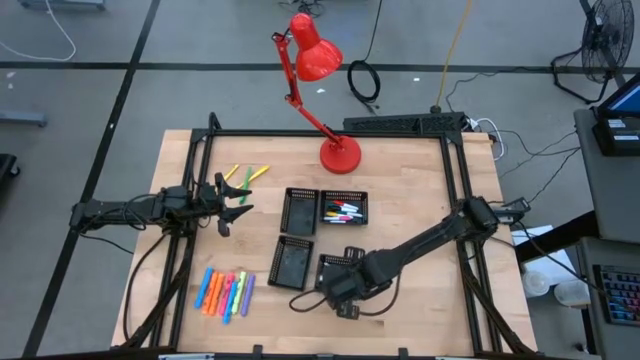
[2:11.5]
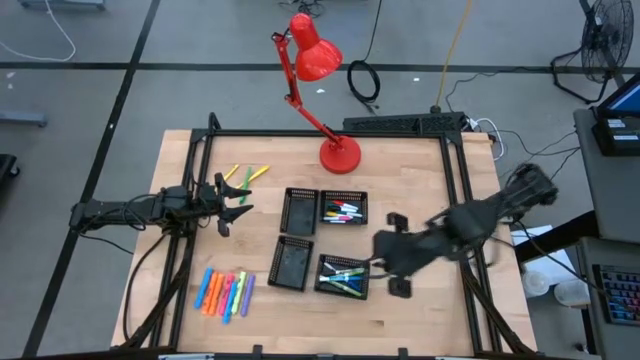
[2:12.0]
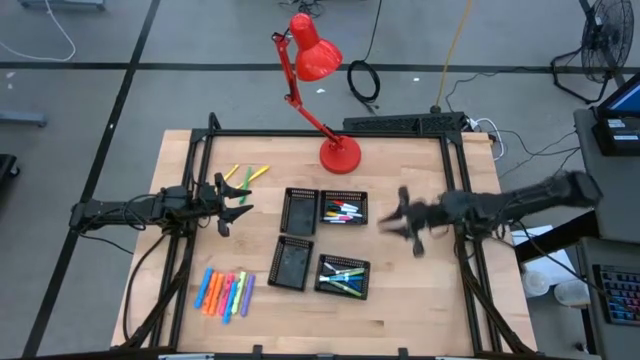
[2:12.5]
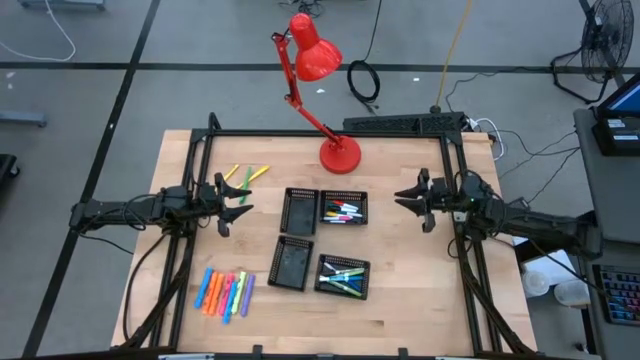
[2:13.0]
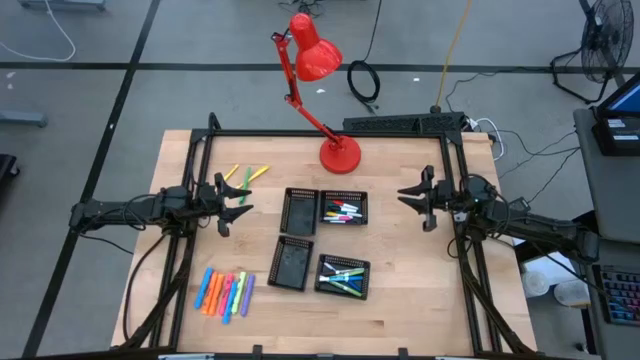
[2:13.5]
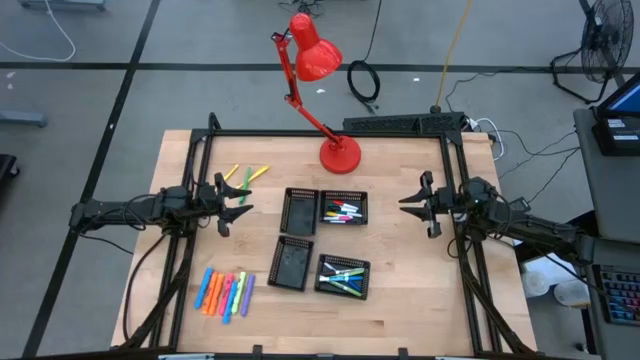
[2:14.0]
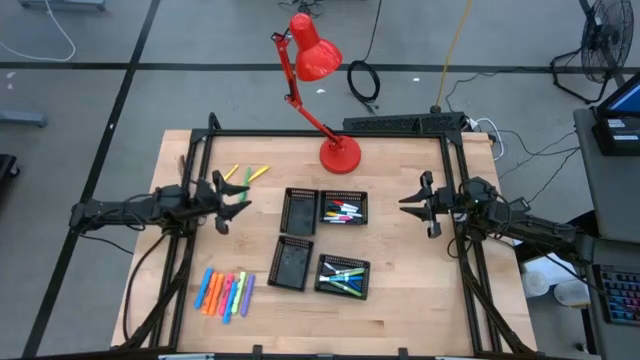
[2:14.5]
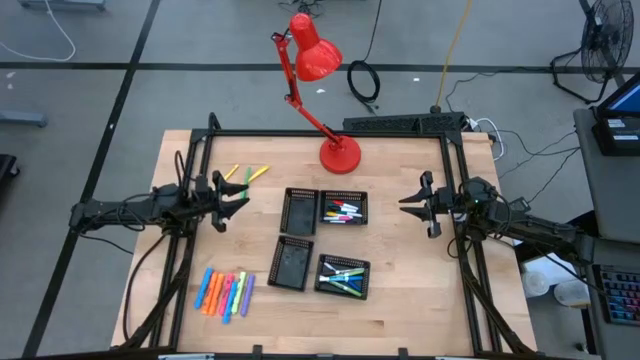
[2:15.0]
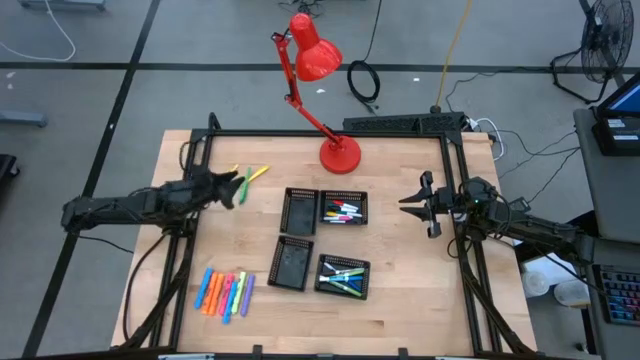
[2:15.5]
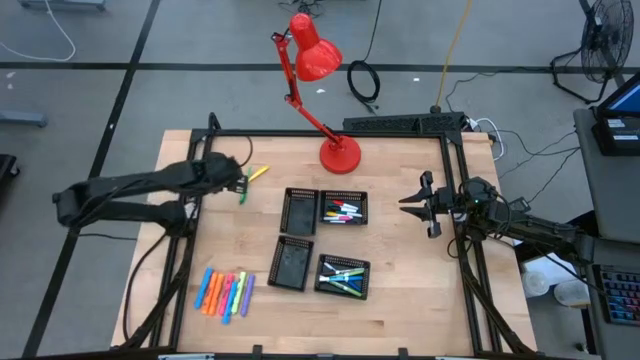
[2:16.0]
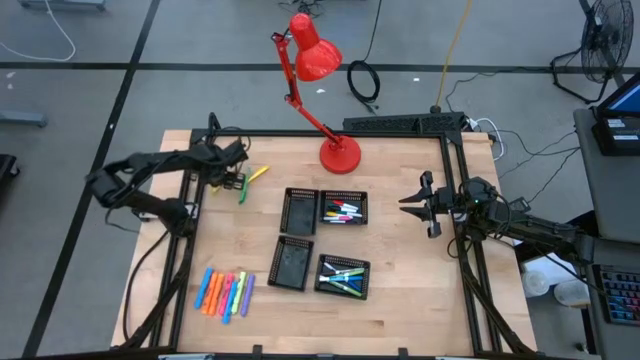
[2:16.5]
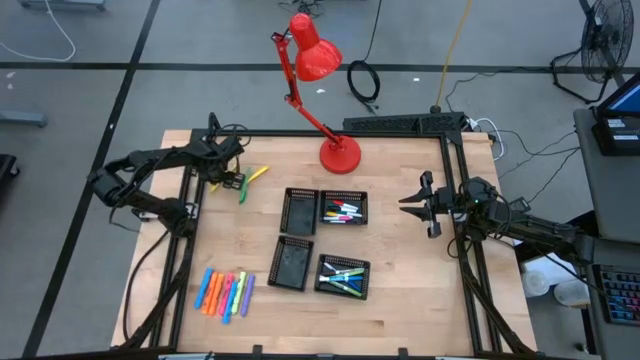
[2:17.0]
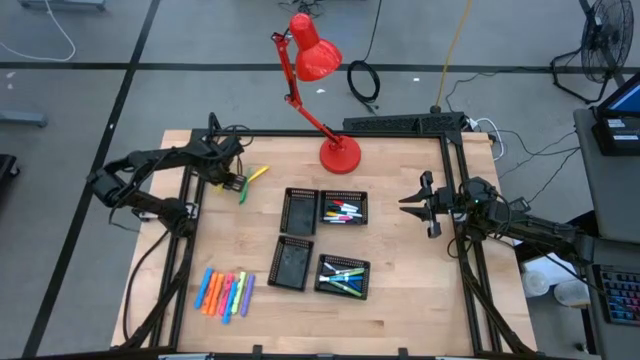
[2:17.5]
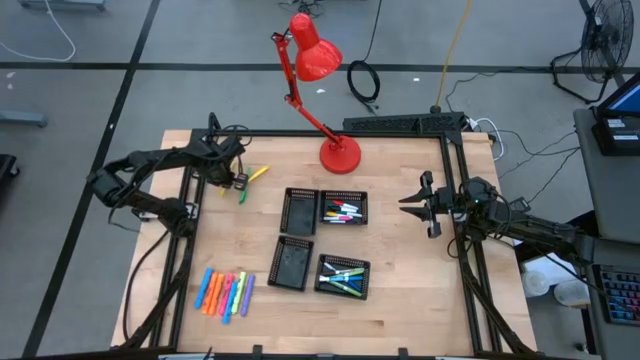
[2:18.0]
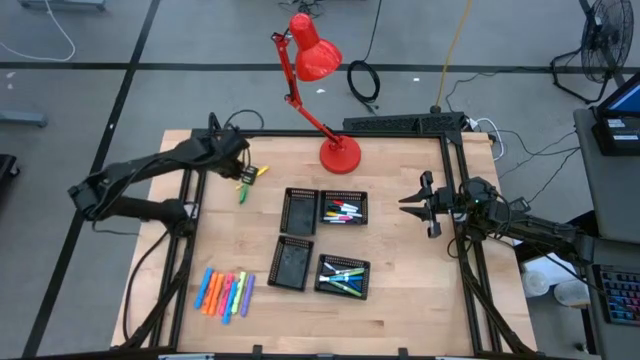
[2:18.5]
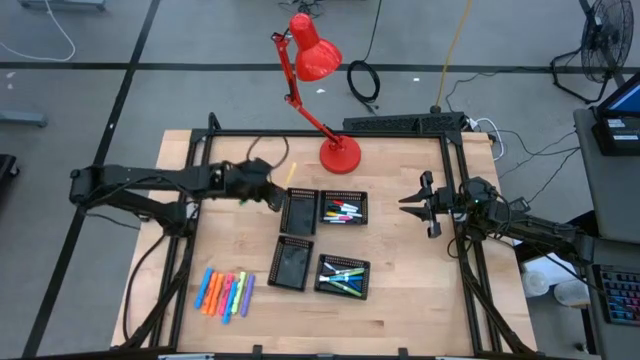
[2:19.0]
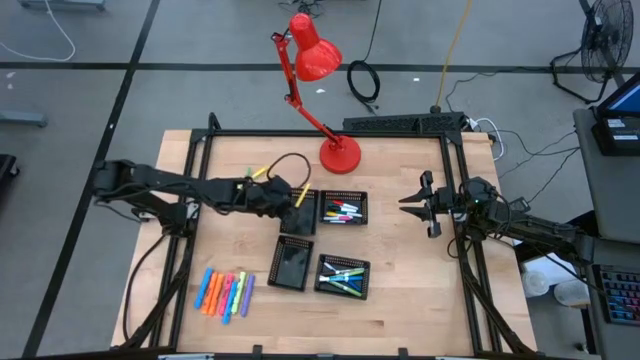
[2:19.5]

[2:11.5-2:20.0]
Task: Pick & Place Markers
Put the yellow pen into the top left black bin

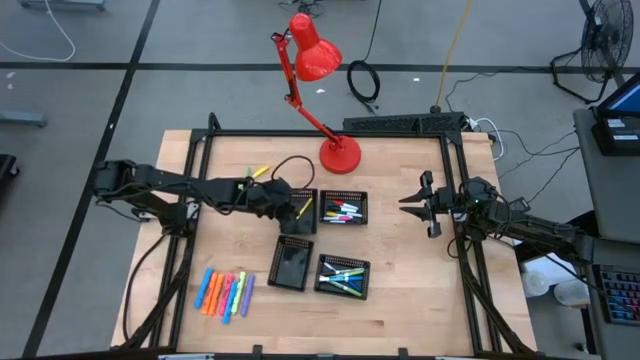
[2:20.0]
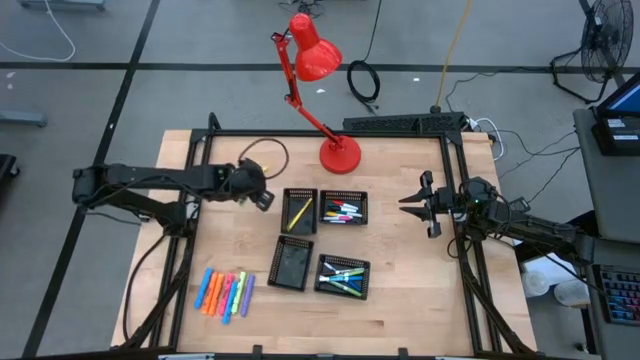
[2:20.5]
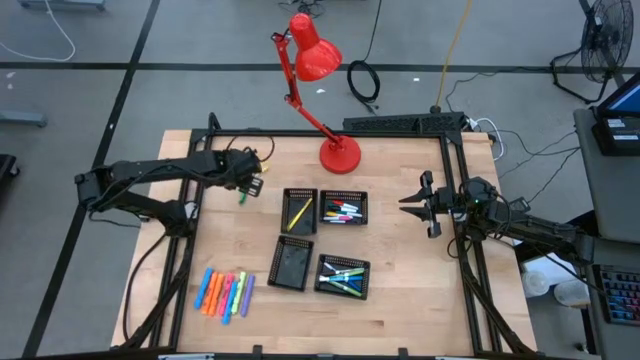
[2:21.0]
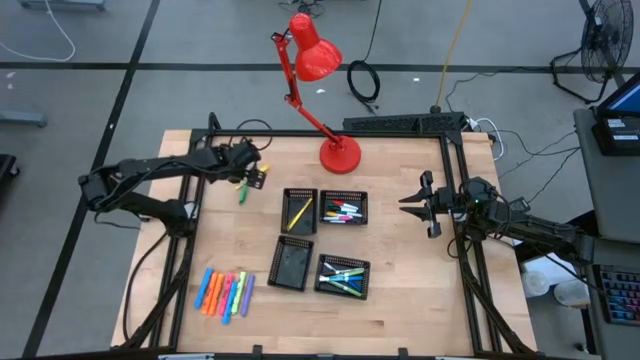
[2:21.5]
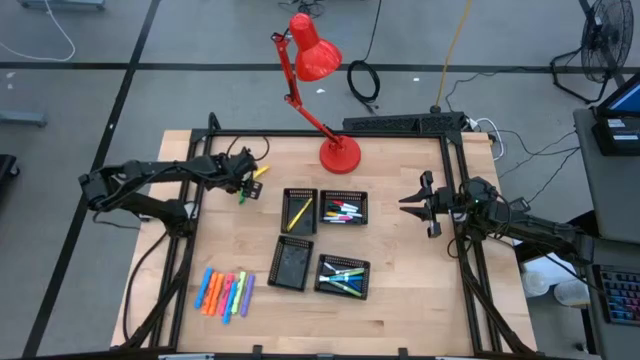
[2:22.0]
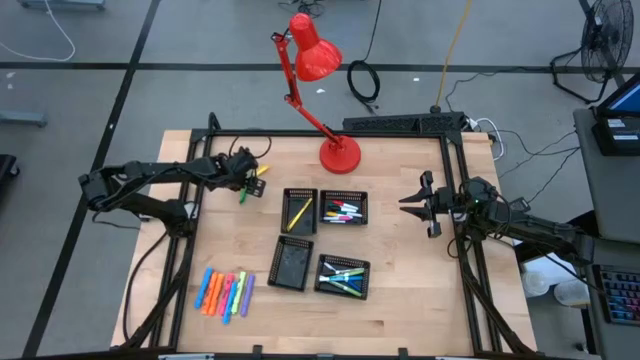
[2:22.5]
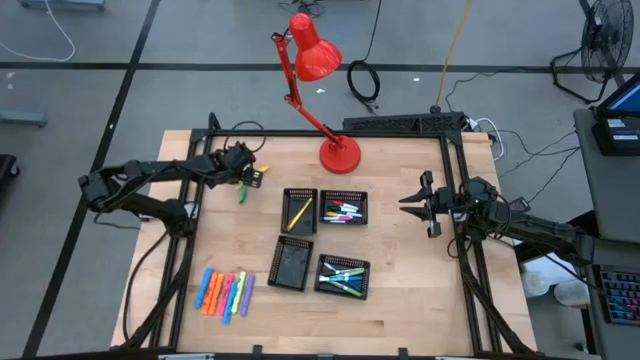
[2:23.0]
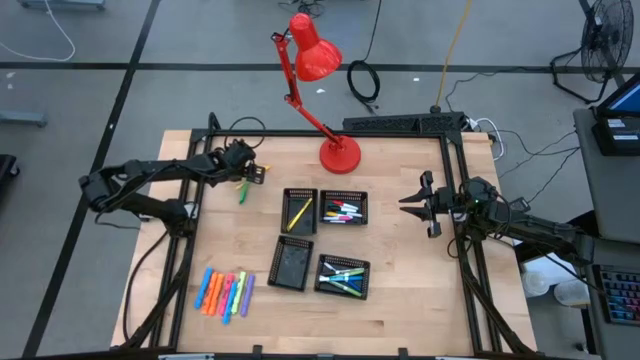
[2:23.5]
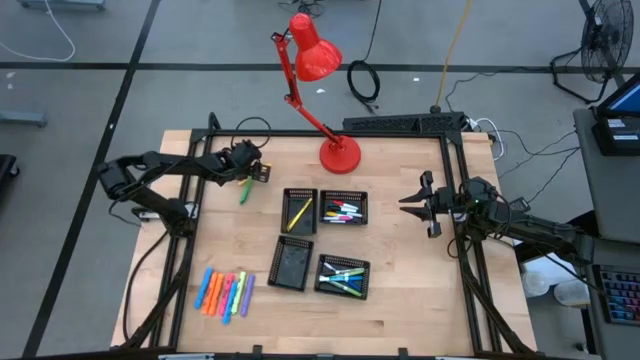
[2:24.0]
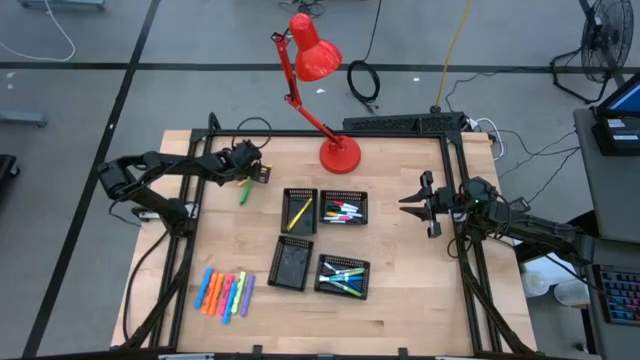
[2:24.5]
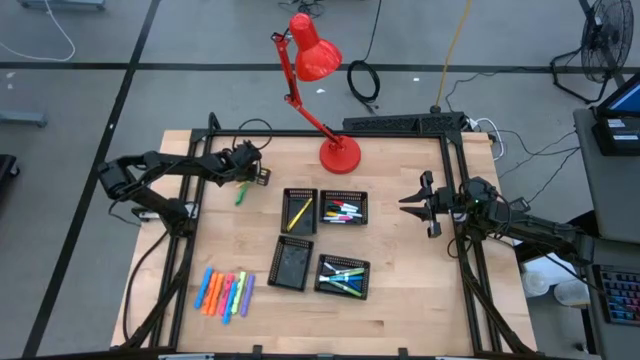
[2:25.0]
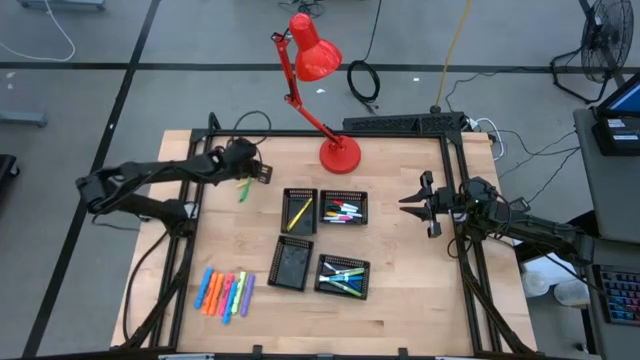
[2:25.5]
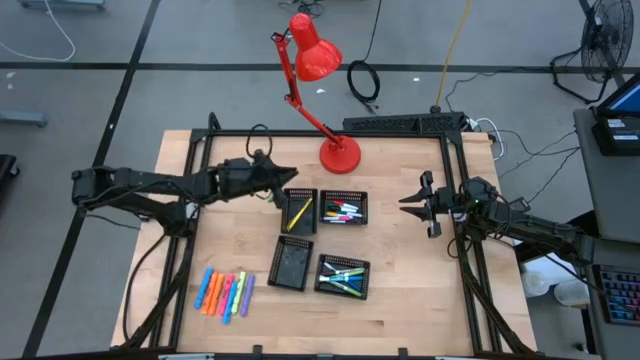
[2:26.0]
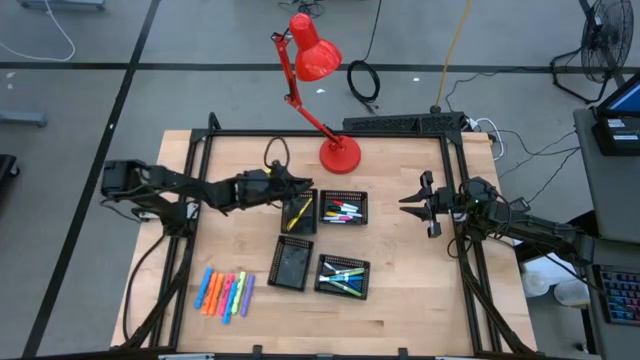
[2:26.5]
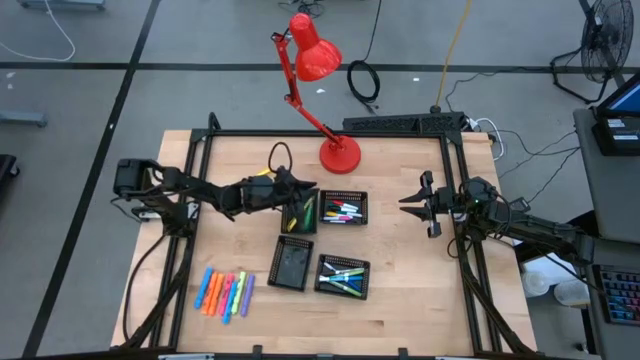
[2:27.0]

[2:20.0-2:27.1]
Put the green pen into the top left black bin

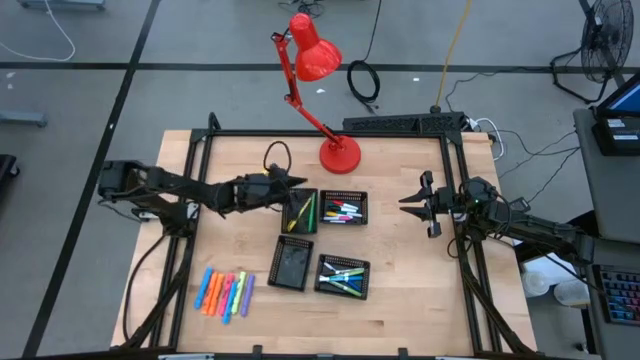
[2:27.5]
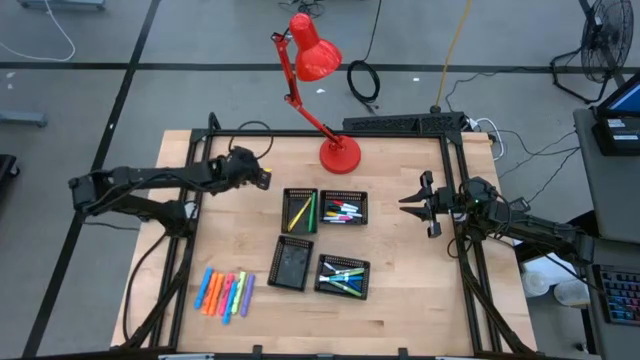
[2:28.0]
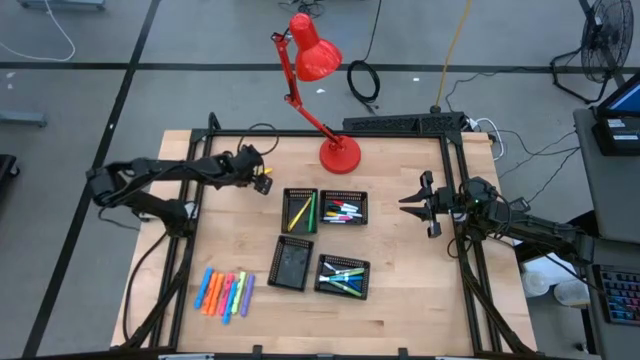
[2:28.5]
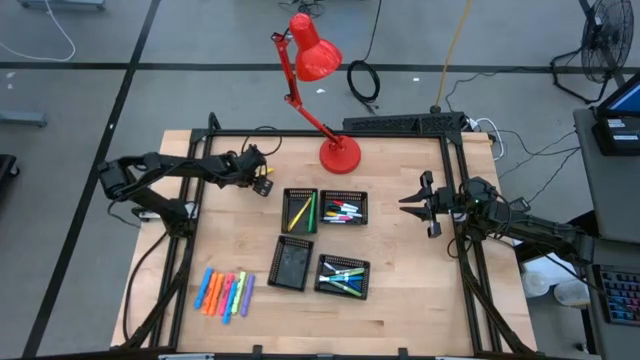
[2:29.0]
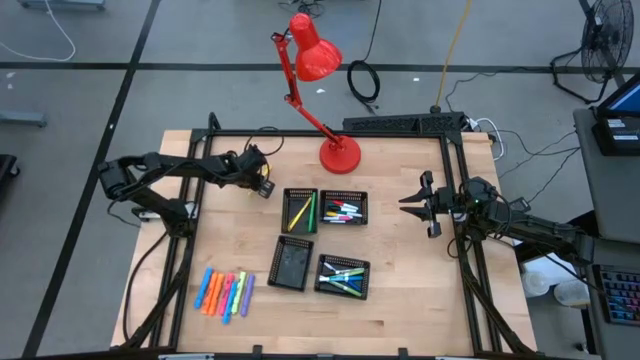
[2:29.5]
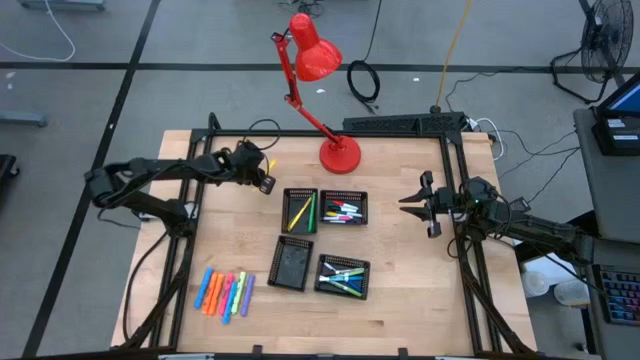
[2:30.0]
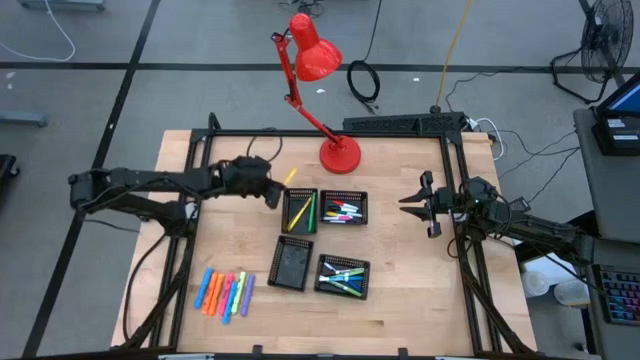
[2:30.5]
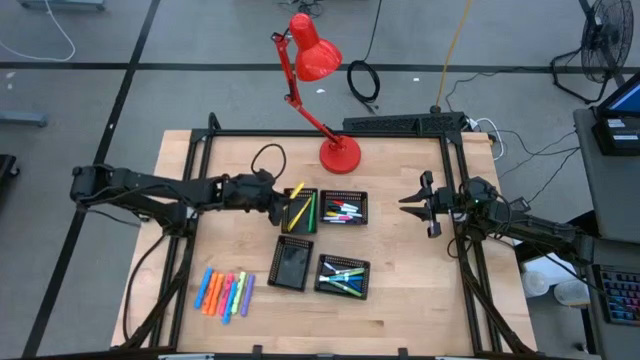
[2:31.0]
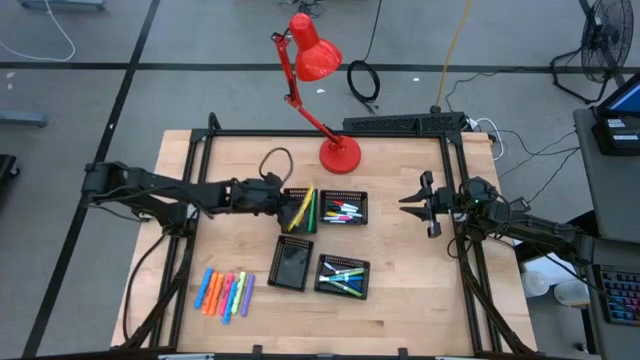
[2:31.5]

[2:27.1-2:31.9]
Put the yellow pen into the top left black bin
